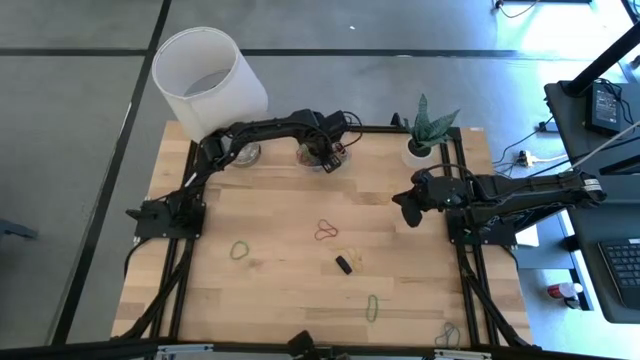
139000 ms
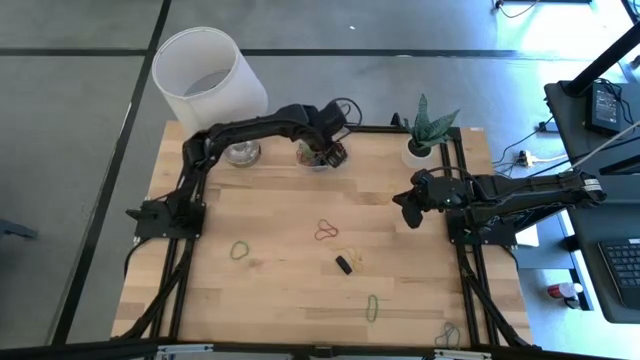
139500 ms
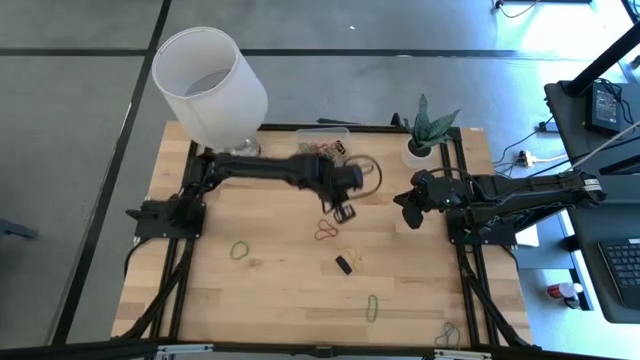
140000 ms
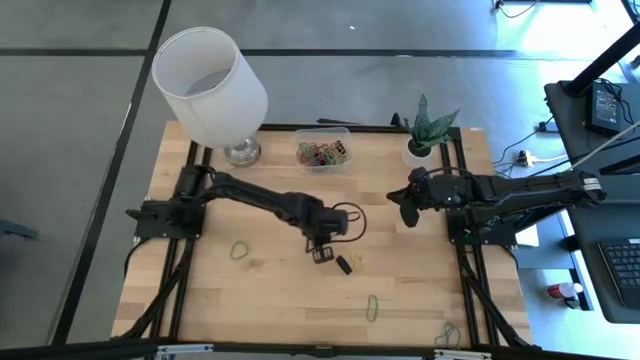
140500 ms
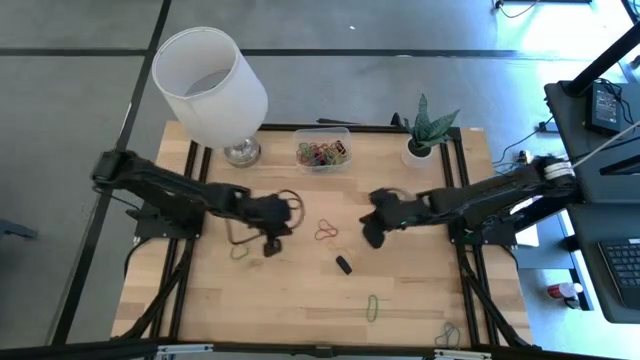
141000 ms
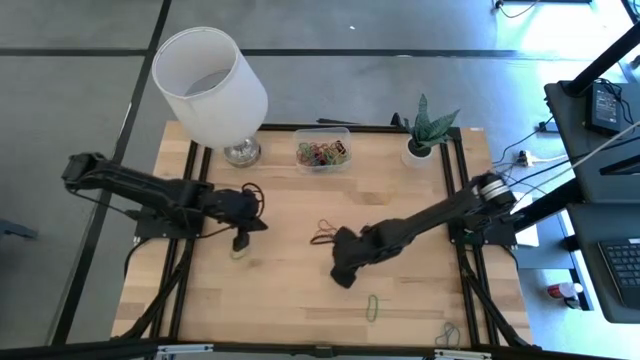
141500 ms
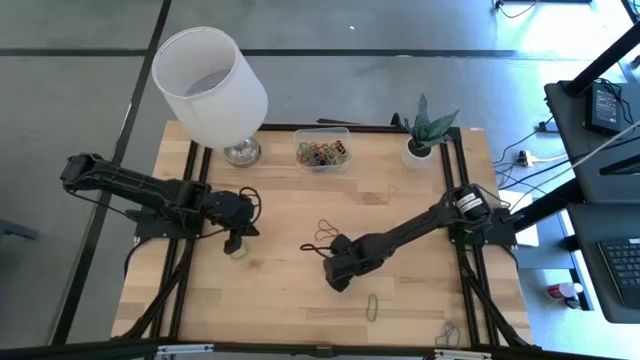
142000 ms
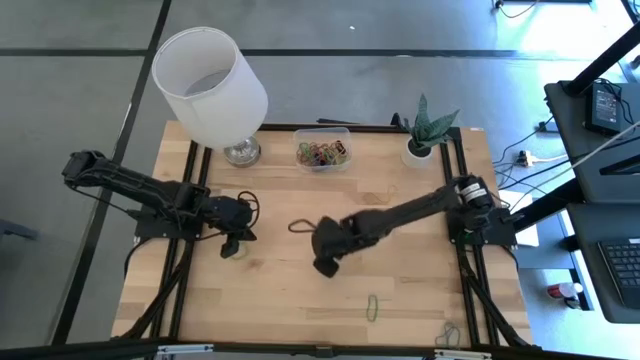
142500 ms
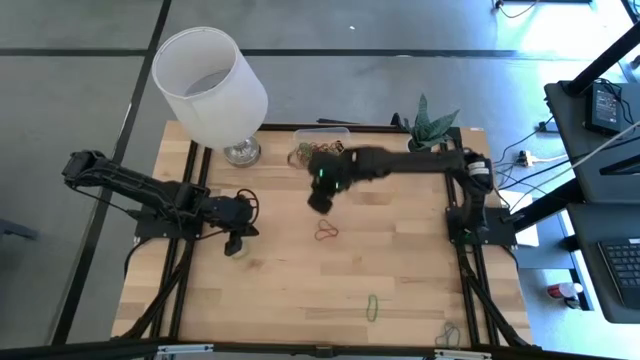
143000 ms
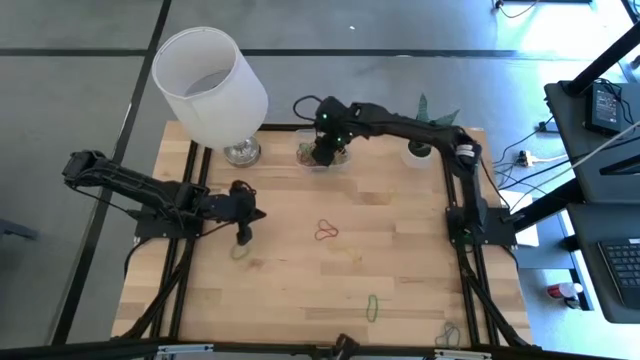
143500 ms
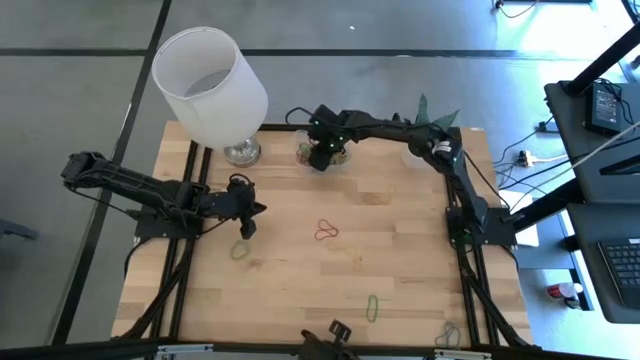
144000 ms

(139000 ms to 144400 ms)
Task: Pick and place rubber bands into bin
Put the black rubber band into the transparent bin

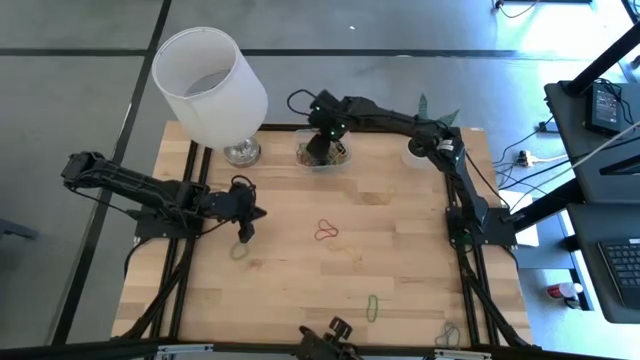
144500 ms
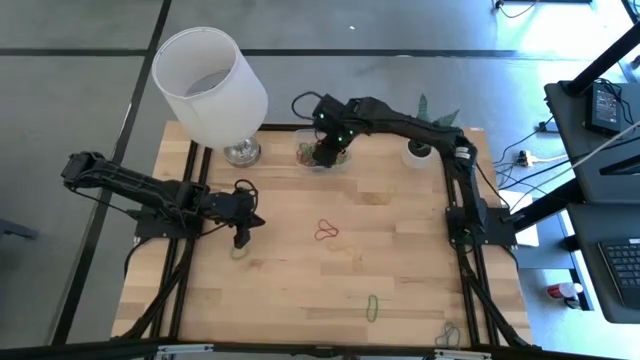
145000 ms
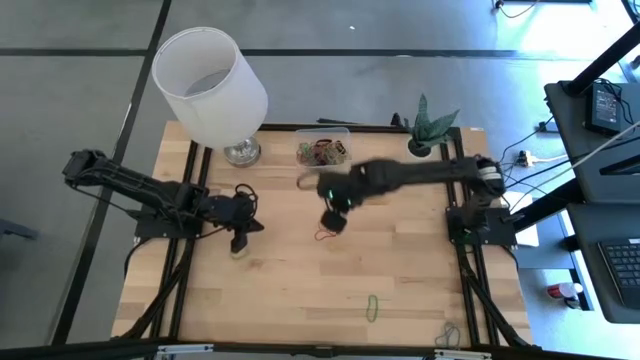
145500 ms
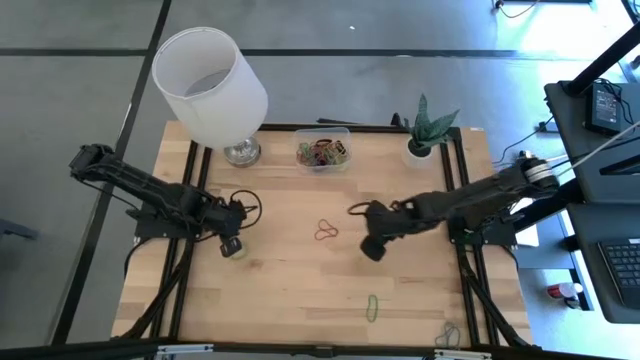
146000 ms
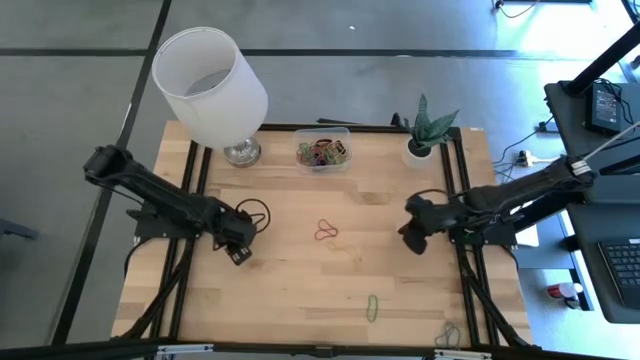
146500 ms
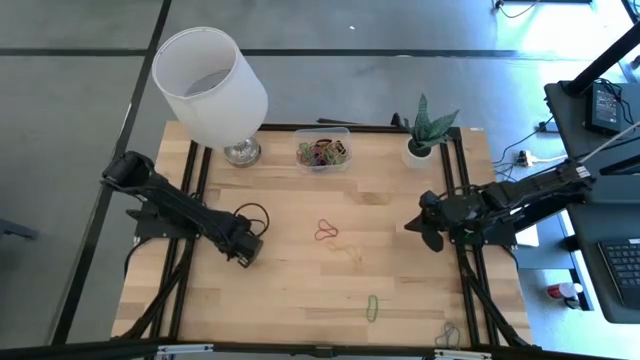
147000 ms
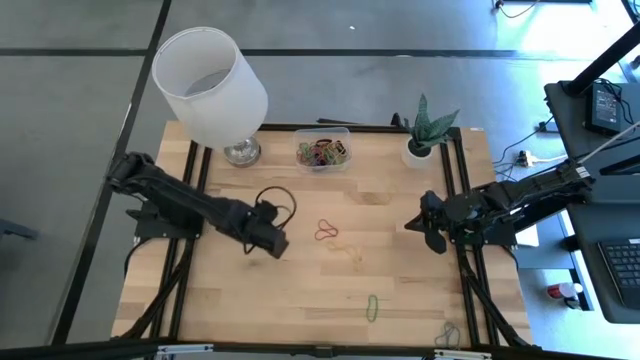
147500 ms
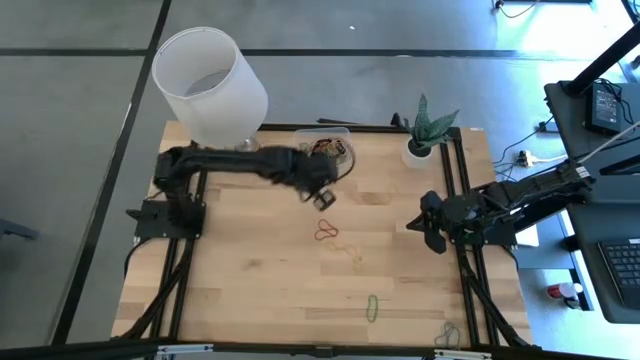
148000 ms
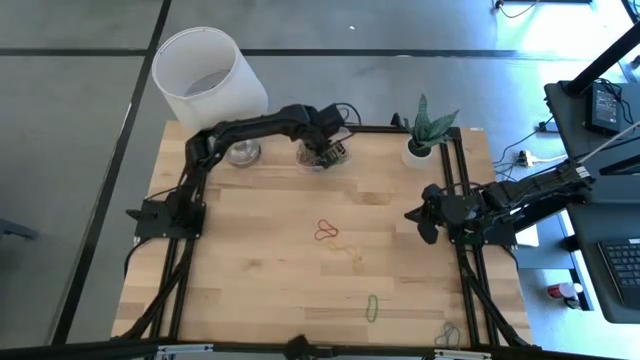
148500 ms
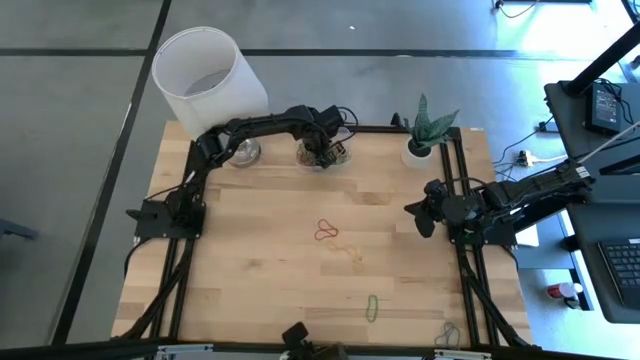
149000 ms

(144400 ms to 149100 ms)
Put the top green rubber band into the transparent bin

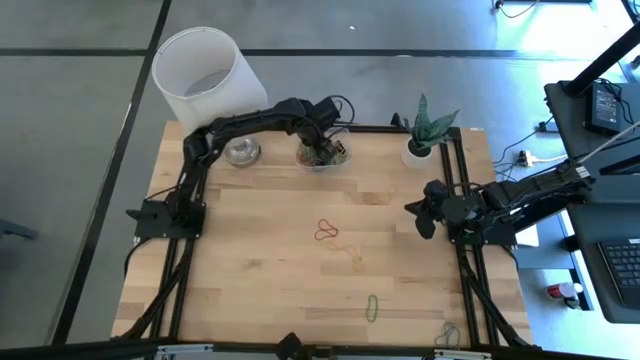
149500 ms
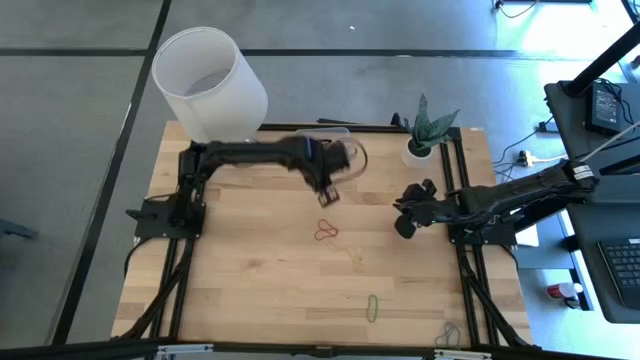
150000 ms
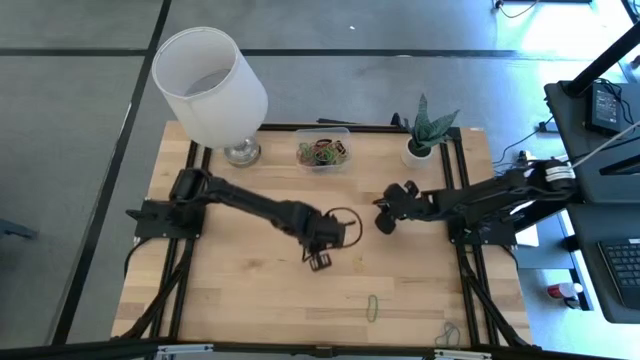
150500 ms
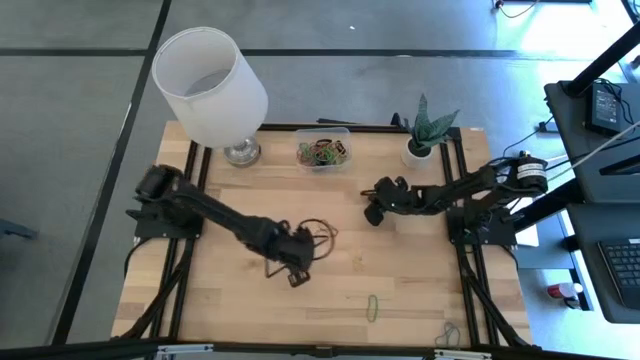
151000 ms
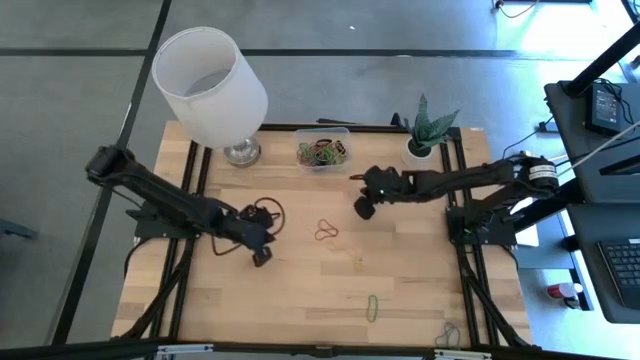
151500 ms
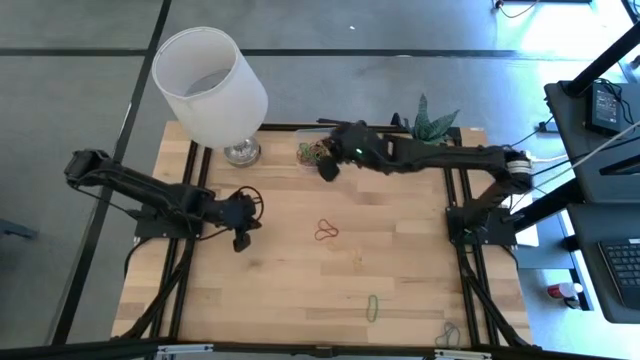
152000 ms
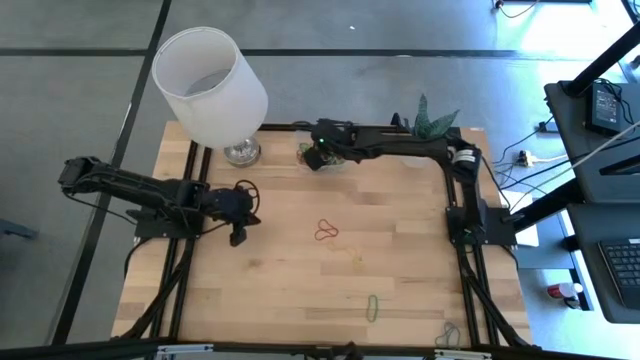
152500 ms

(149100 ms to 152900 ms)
Put the top yellow rubber band into the transparent bin

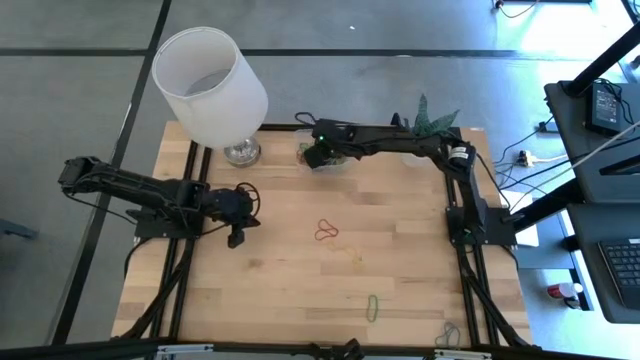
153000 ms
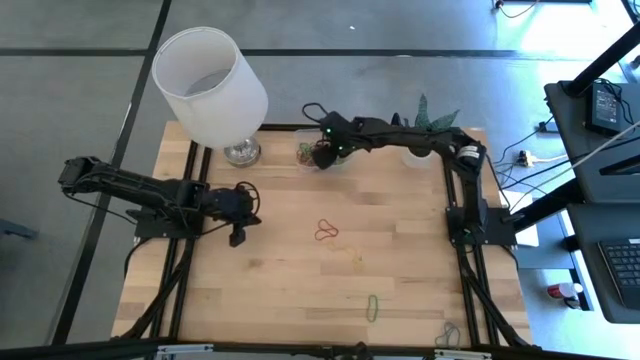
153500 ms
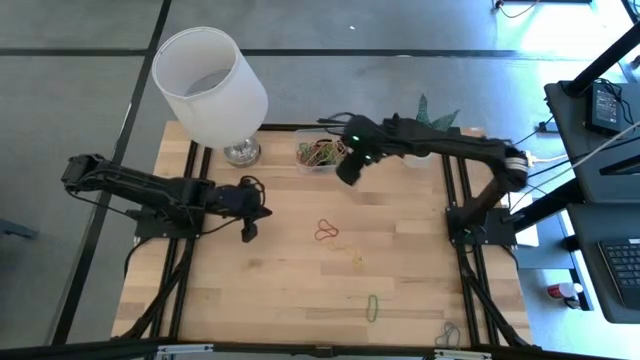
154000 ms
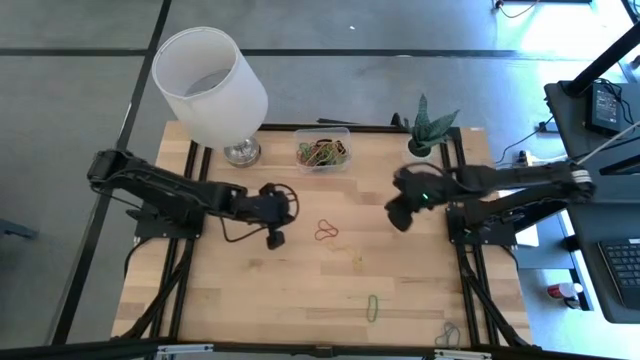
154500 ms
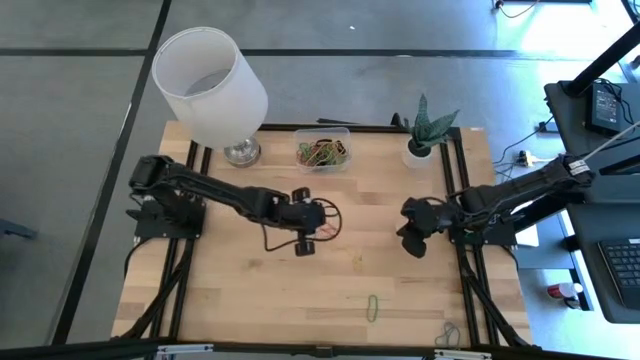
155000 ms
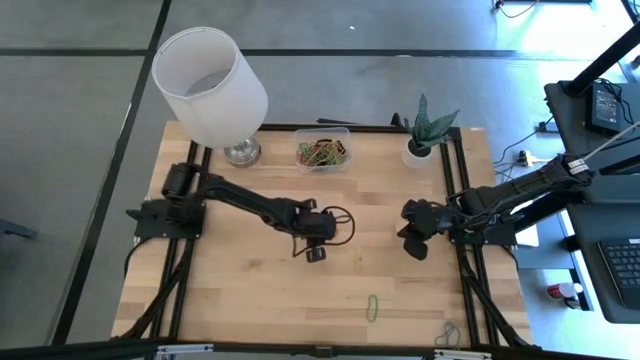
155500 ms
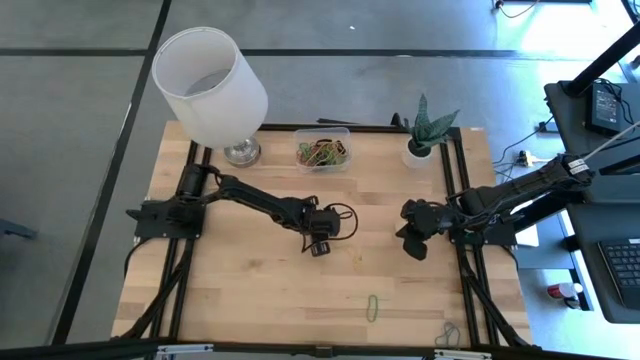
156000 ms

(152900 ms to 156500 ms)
Put the red rubber band into the transparent bin

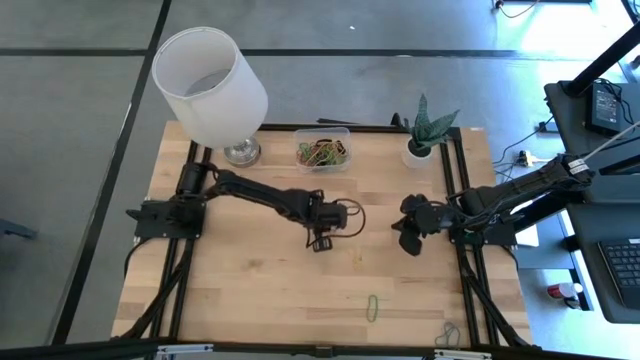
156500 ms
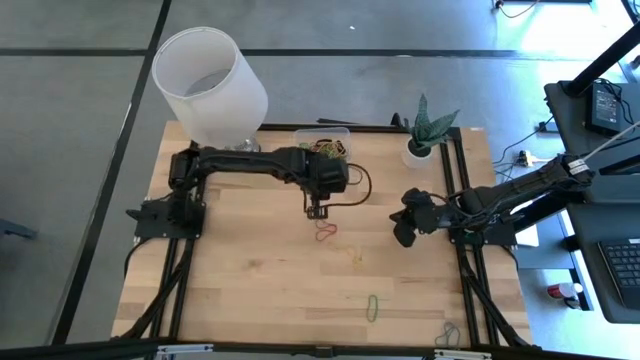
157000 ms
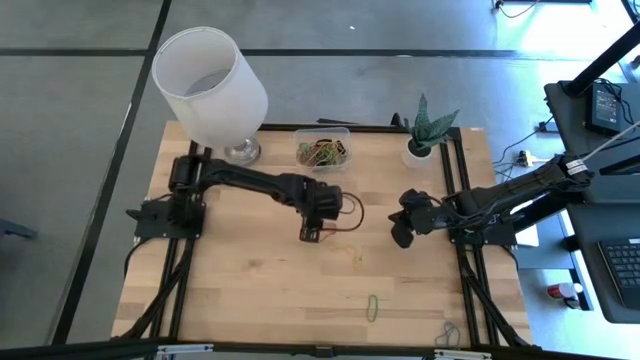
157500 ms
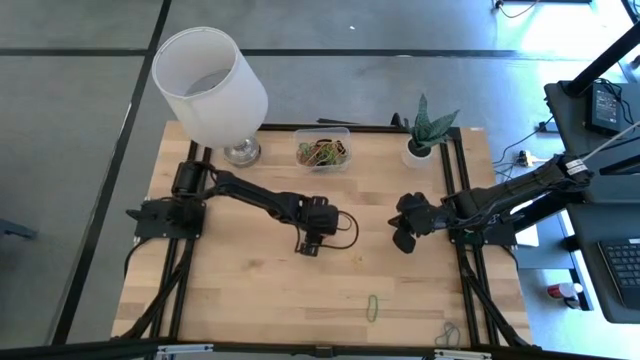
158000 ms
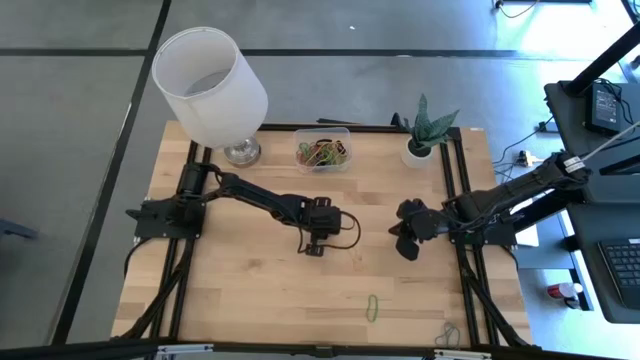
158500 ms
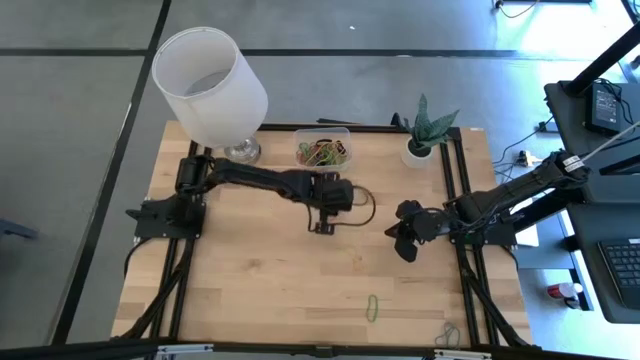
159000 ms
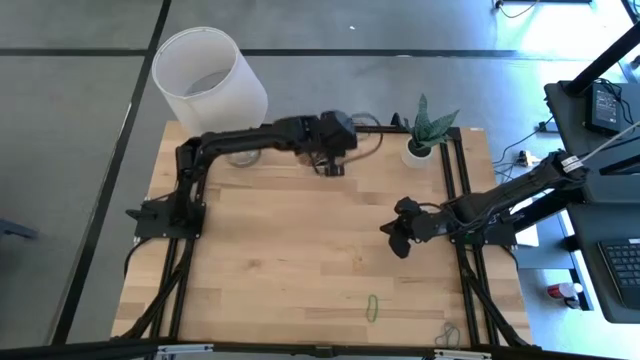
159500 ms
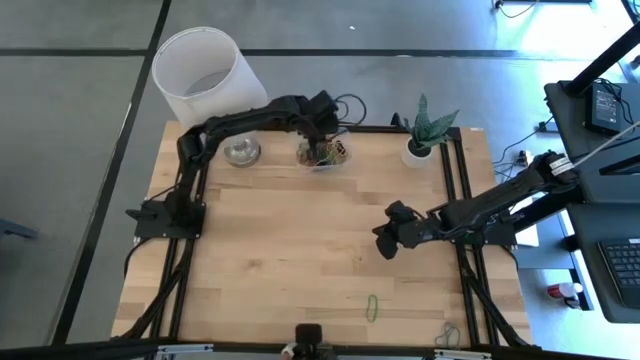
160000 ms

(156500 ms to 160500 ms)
Put the red rubber band into the transparent bin
